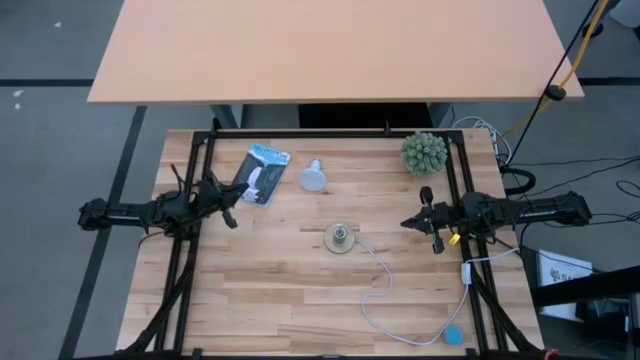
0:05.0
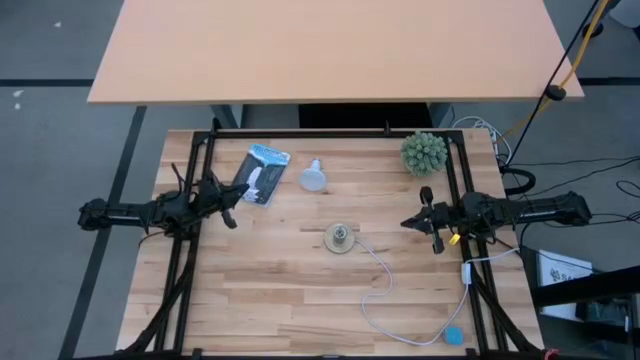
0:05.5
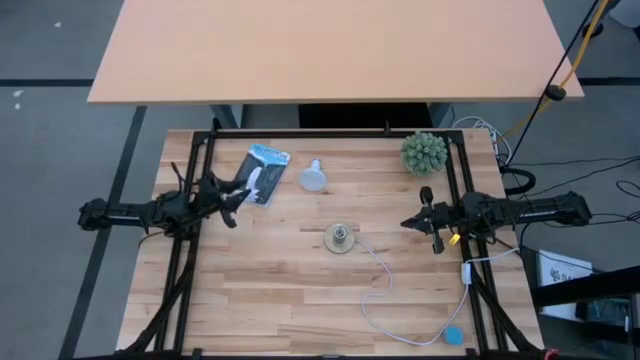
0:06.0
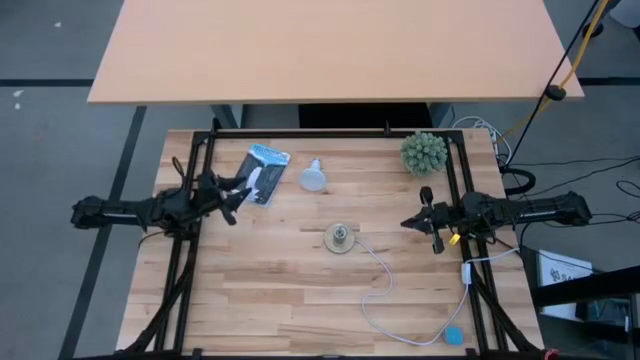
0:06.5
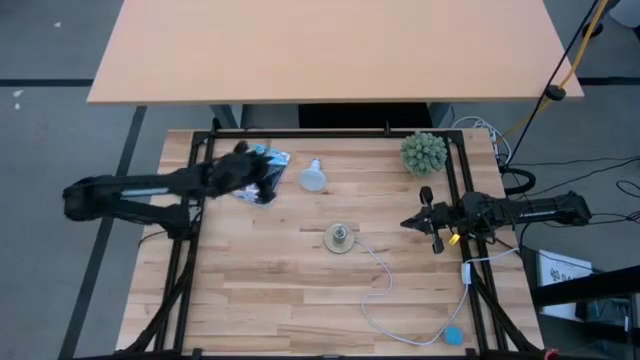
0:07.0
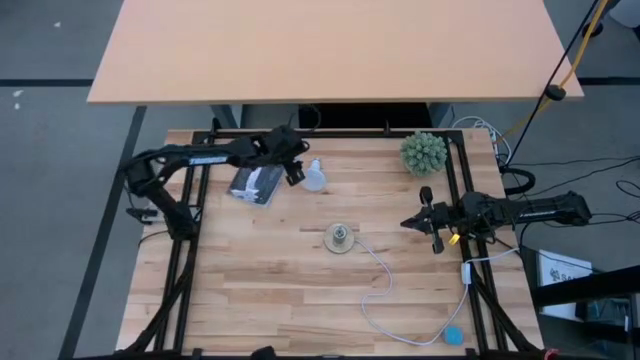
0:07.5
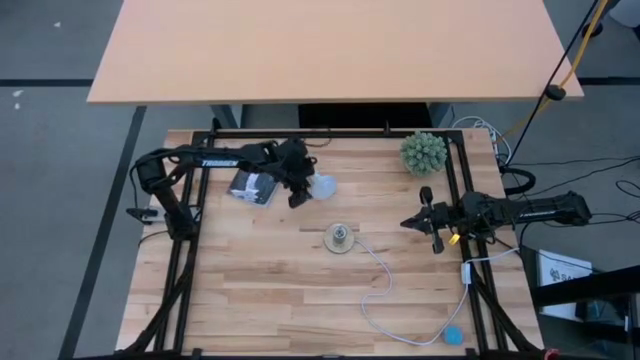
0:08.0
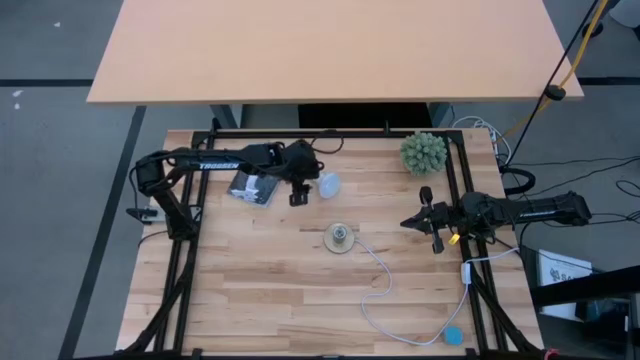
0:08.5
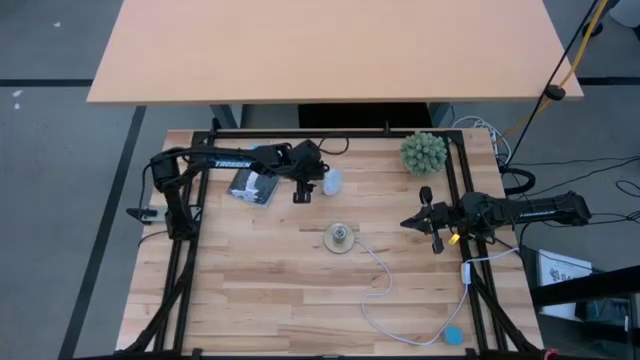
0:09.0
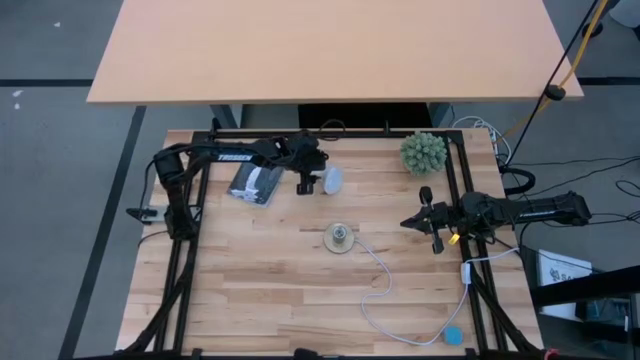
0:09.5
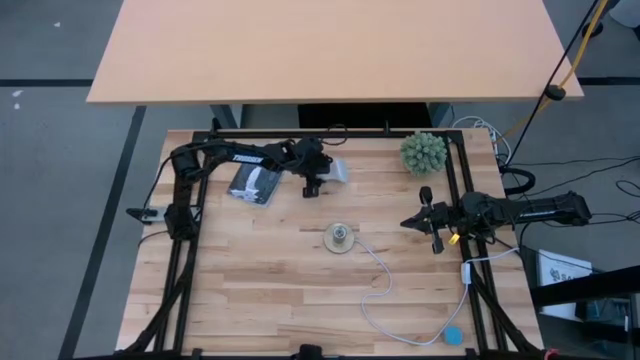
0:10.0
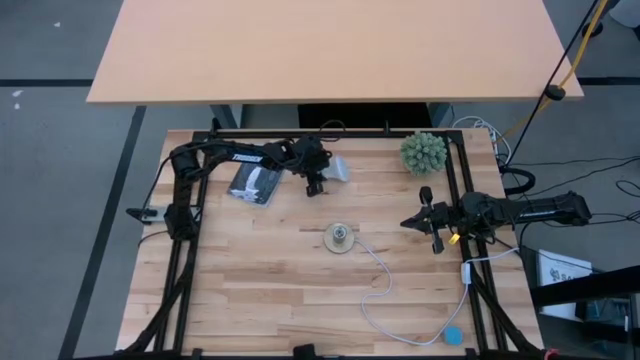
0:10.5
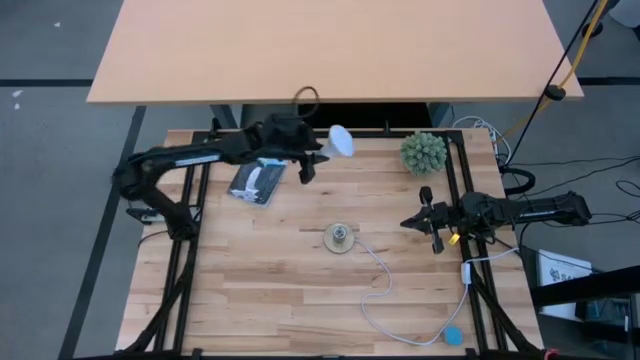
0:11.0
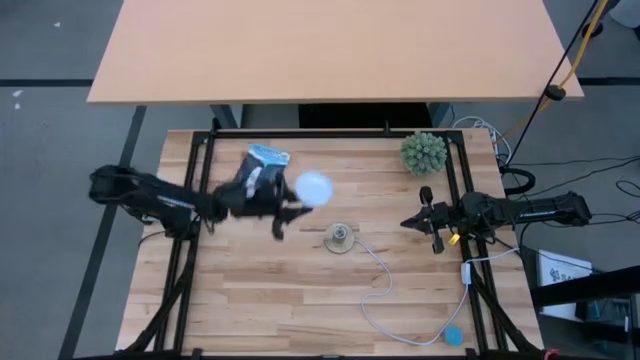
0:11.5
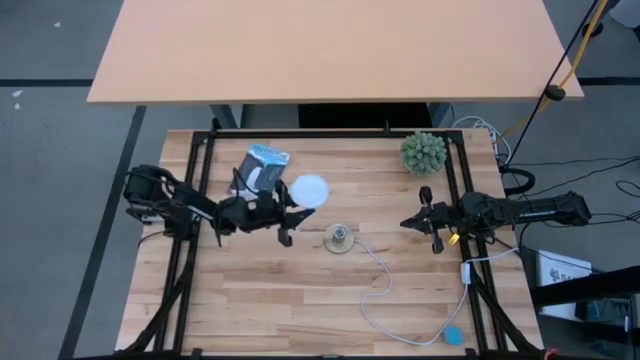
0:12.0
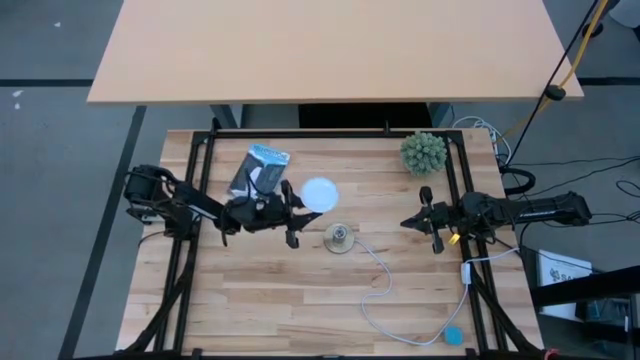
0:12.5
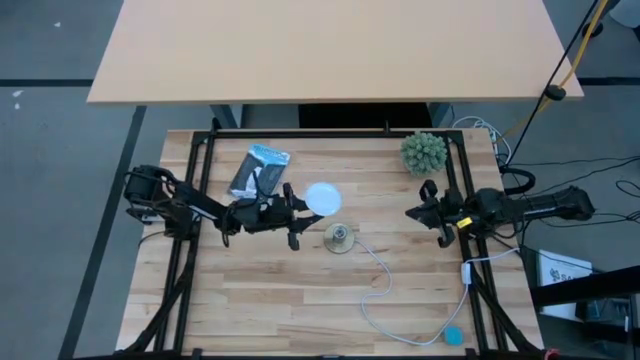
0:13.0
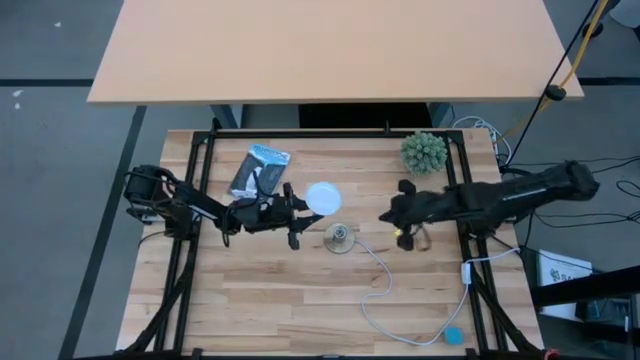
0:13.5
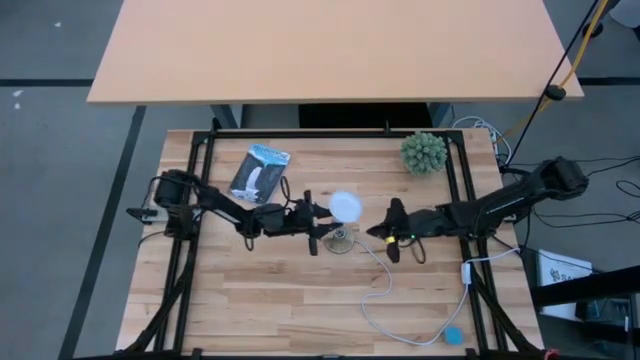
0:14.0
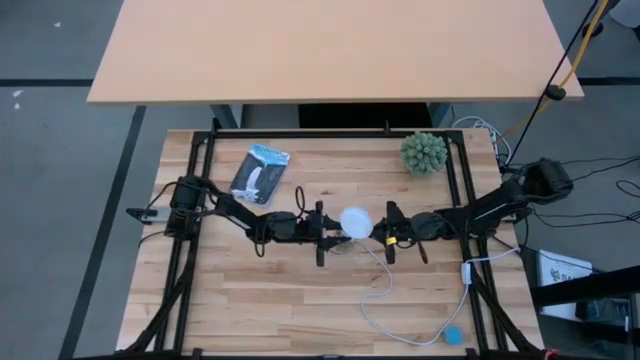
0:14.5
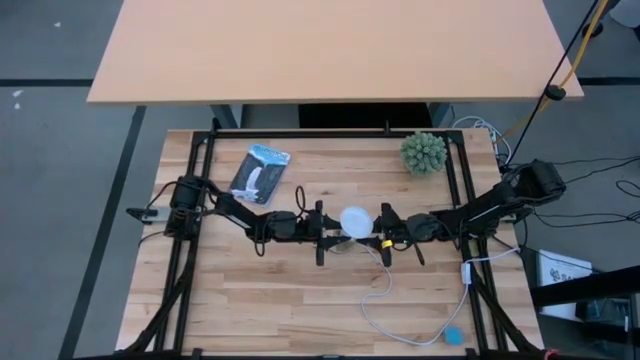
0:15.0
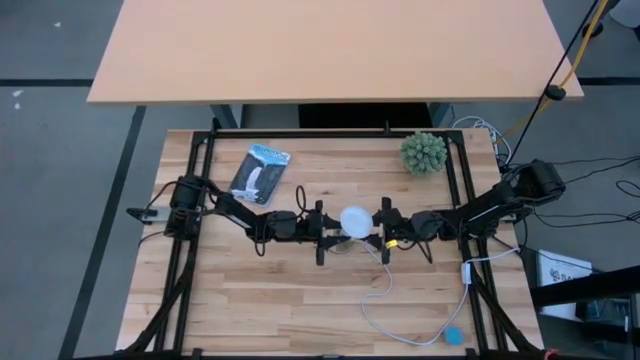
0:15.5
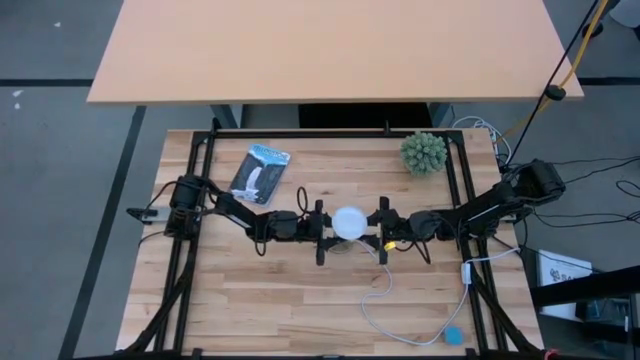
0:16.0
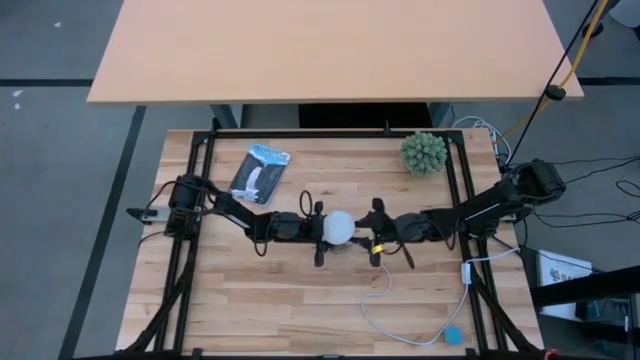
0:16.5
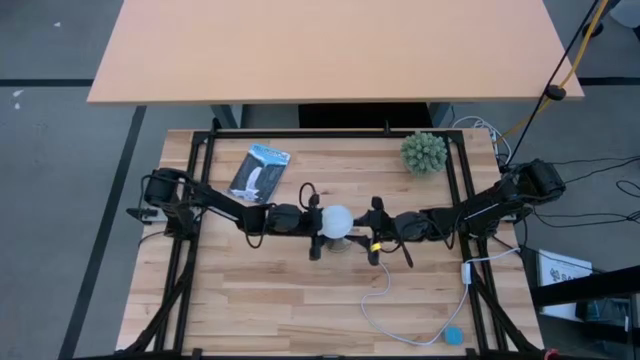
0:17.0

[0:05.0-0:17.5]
Task: Screw lightbulb
Insert the white lightbulb into the gold lamp

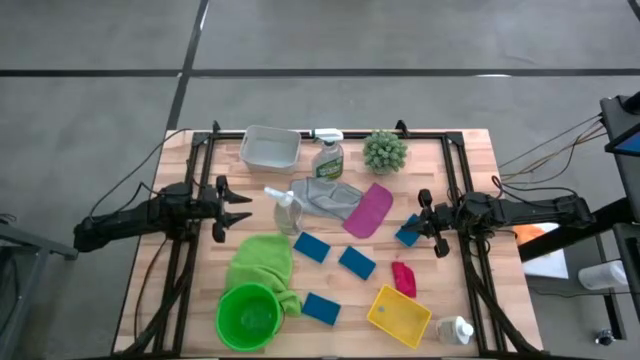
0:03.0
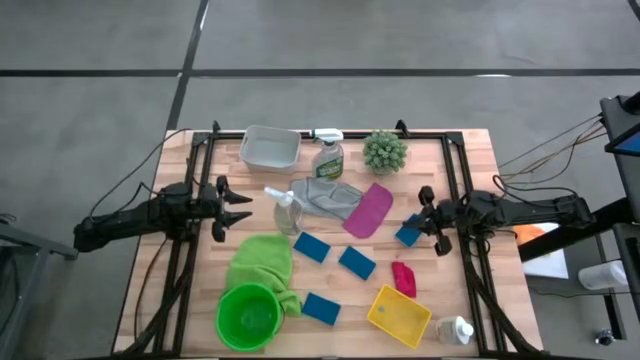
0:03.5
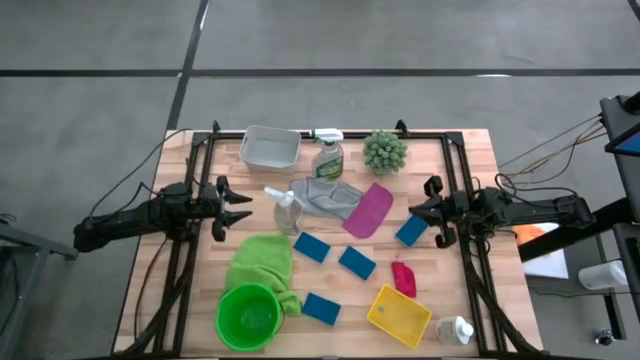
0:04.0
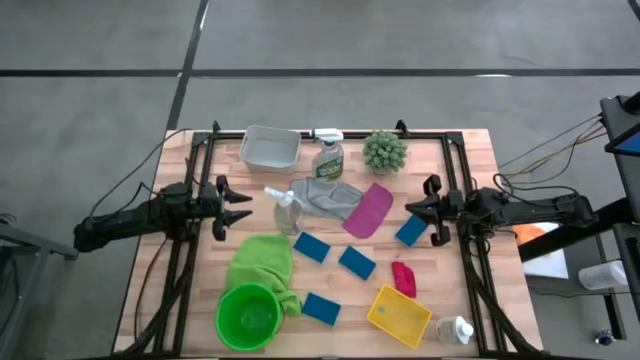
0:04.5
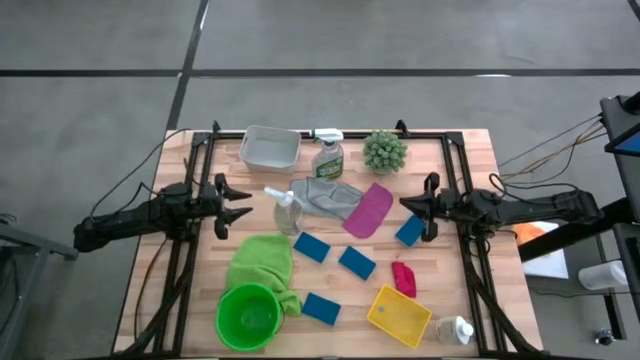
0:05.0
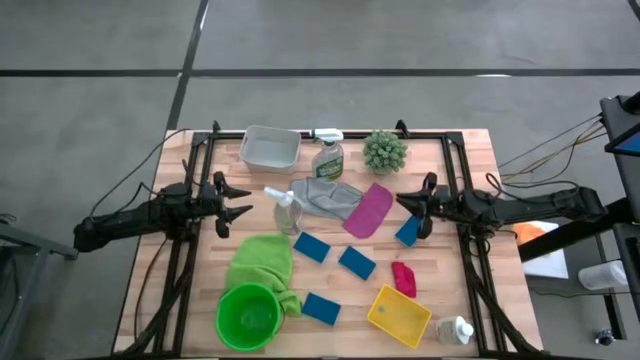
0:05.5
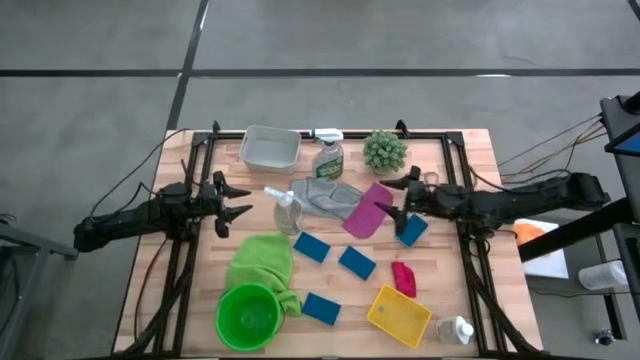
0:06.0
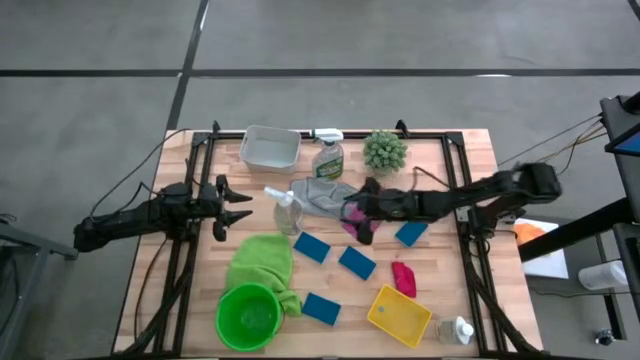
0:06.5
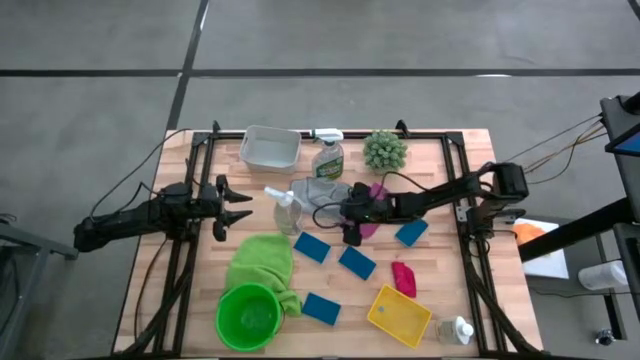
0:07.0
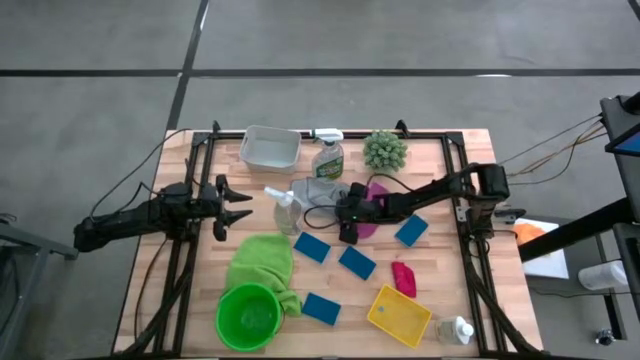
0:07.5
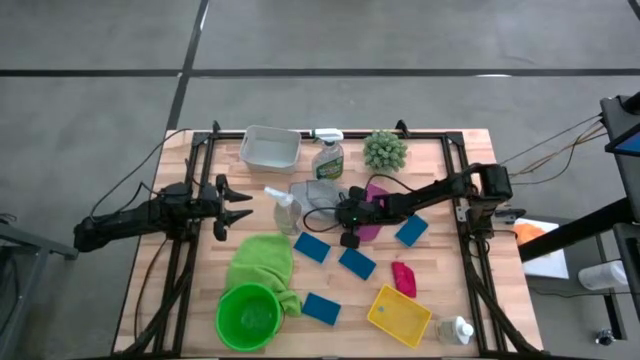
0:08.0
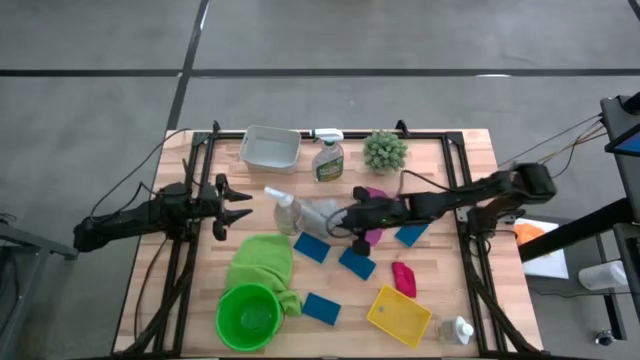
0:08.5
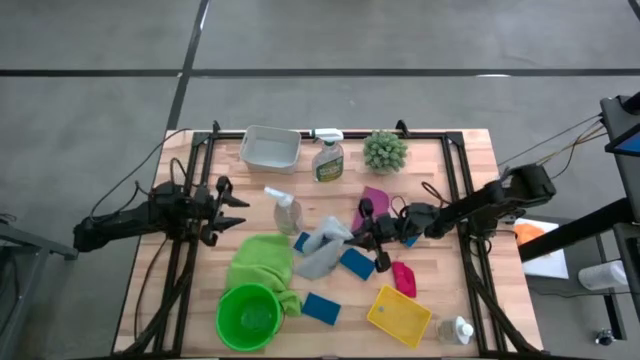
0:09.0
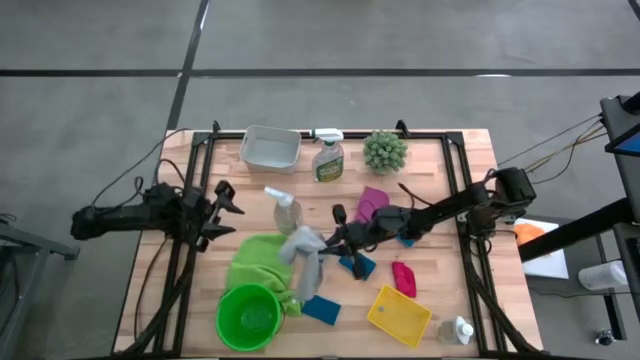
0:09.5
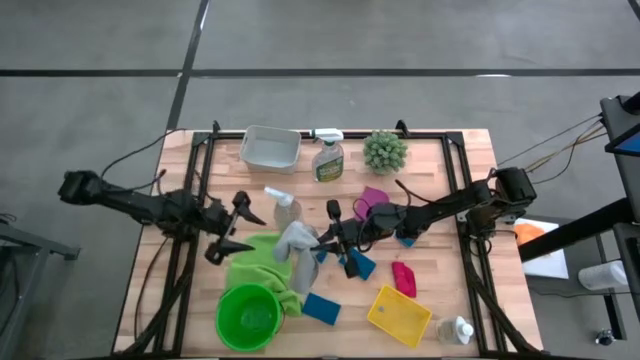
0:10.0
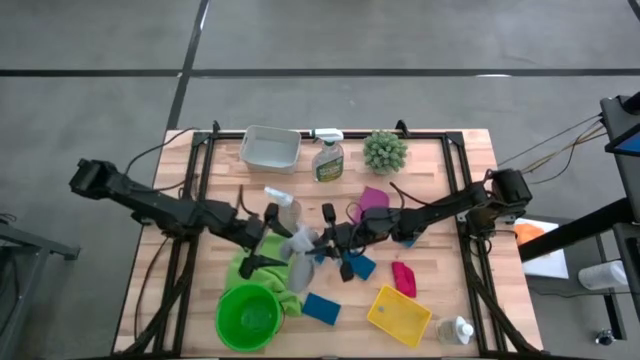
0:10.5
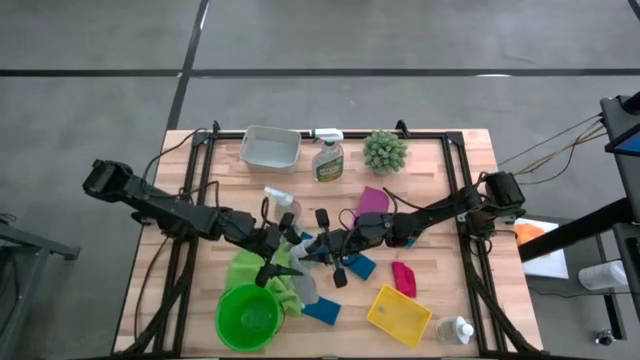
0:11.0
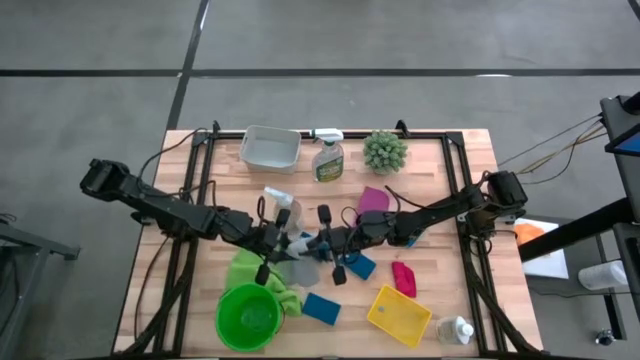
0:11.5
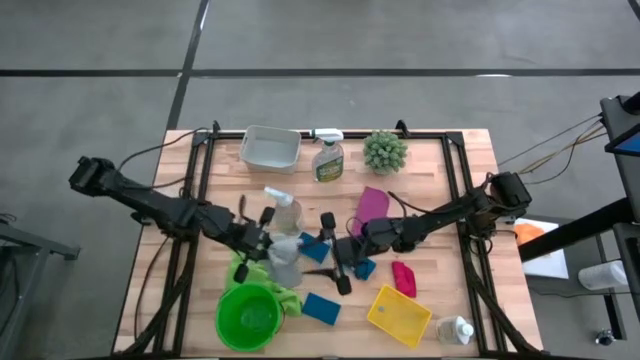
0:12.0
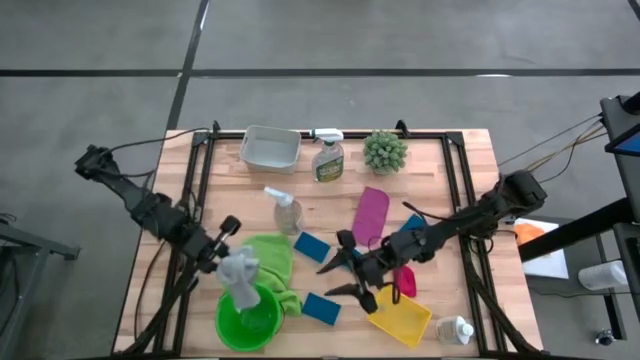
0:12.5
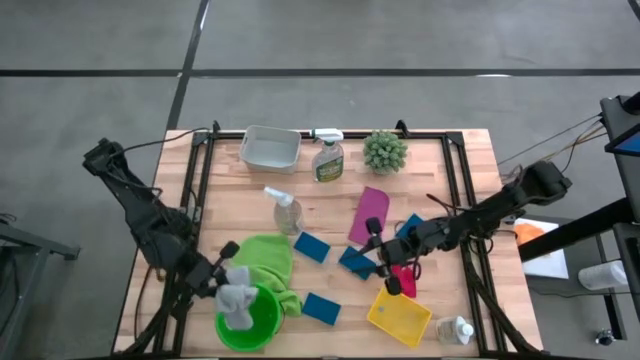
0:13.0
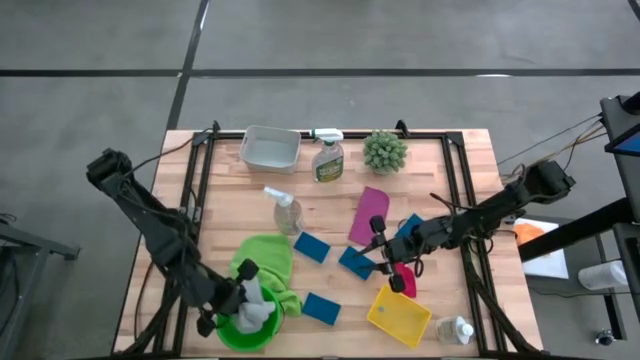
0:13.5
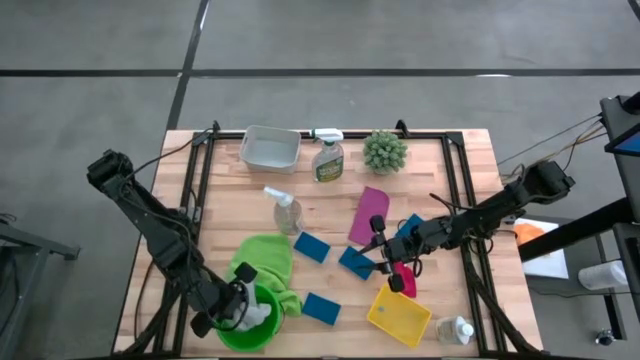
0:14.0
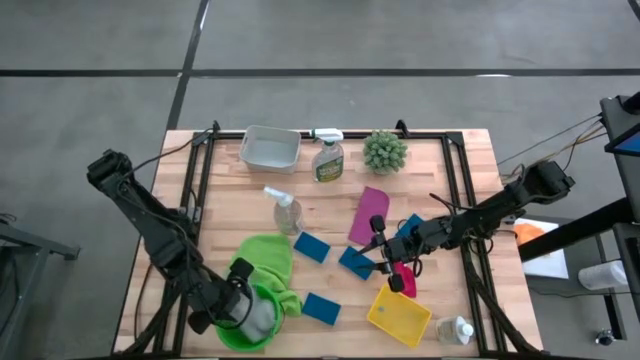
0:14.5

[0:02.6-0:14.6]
Task: Pick & Place Kitchen Items
Put the gray microfiber cloth into the green basket
